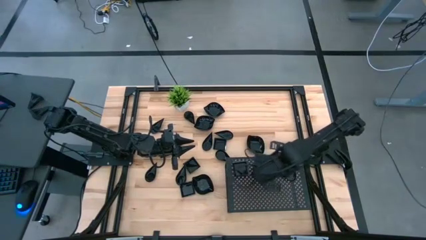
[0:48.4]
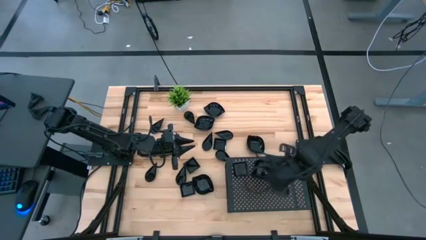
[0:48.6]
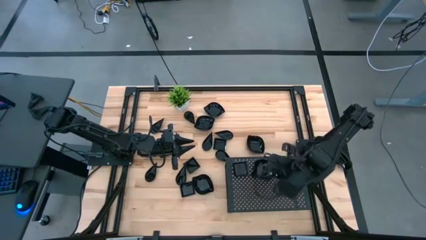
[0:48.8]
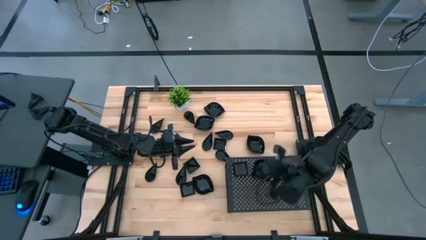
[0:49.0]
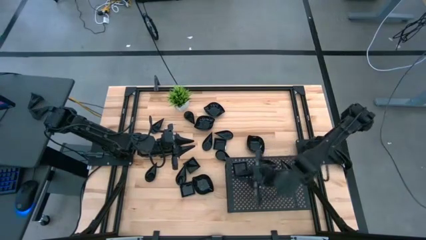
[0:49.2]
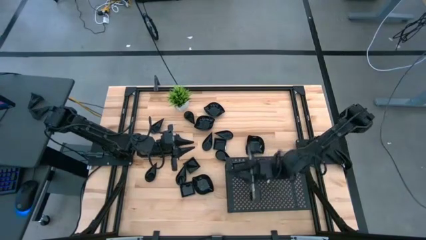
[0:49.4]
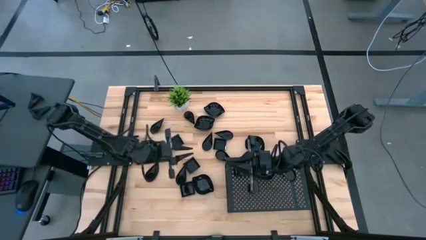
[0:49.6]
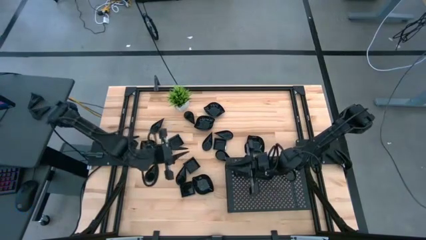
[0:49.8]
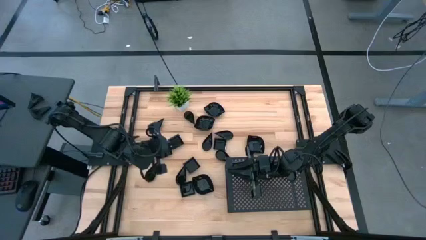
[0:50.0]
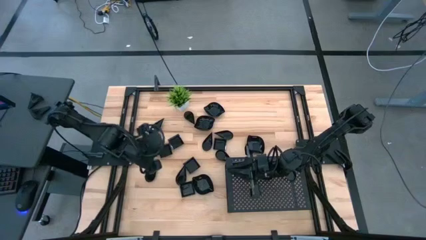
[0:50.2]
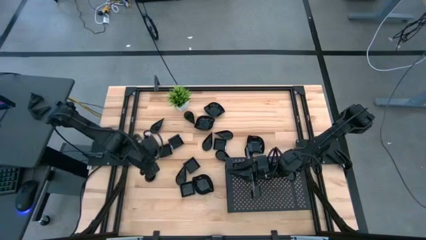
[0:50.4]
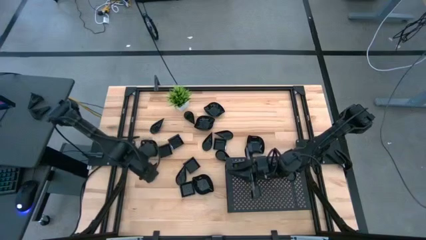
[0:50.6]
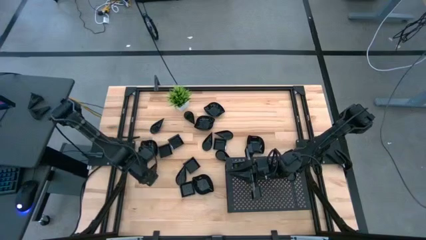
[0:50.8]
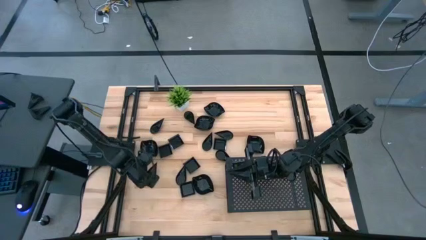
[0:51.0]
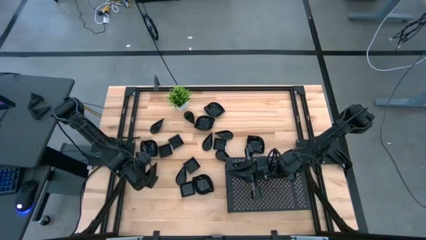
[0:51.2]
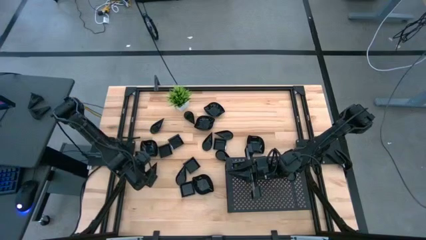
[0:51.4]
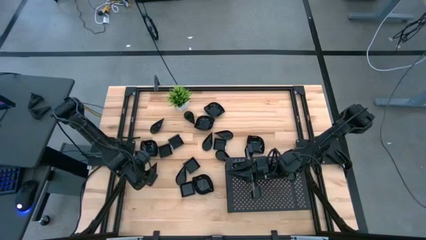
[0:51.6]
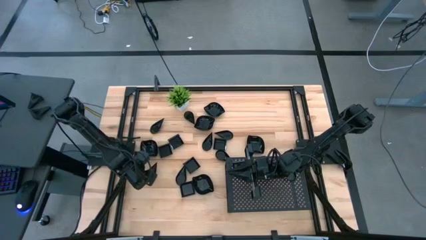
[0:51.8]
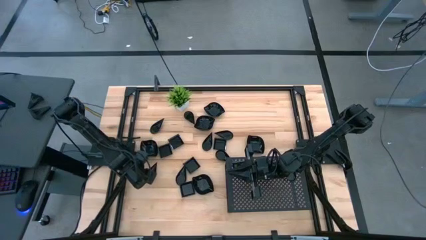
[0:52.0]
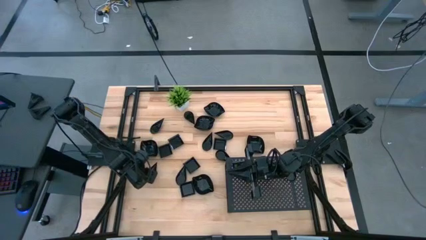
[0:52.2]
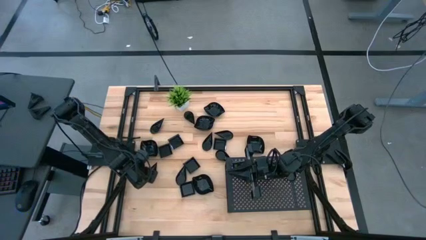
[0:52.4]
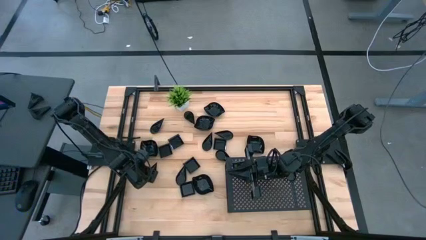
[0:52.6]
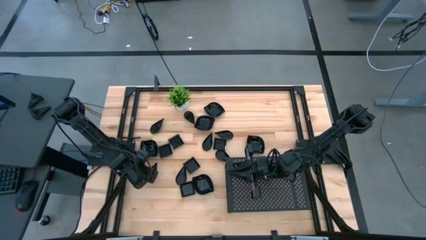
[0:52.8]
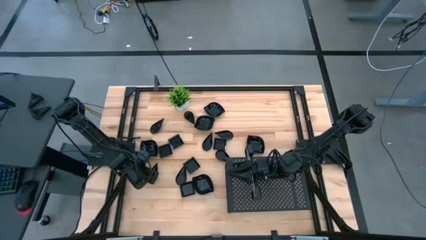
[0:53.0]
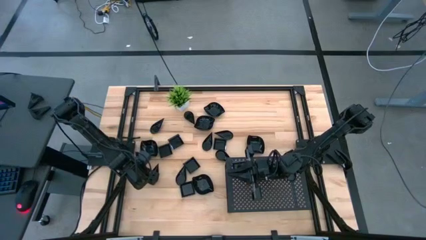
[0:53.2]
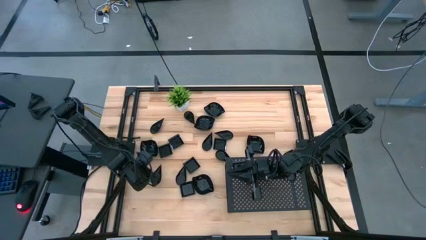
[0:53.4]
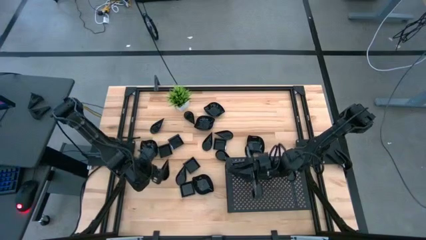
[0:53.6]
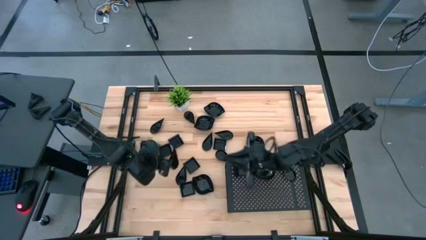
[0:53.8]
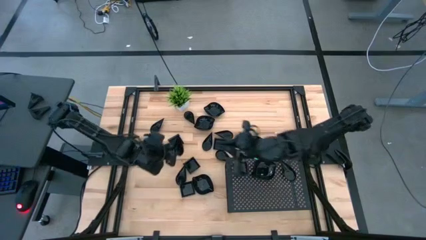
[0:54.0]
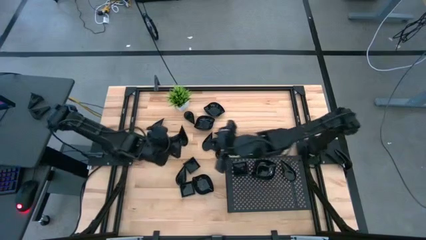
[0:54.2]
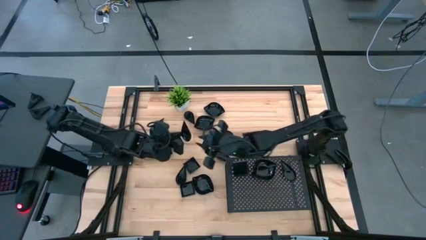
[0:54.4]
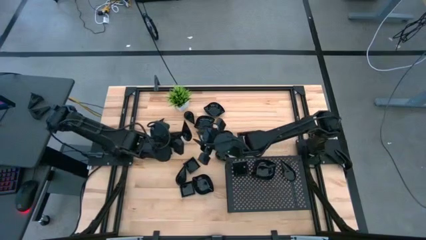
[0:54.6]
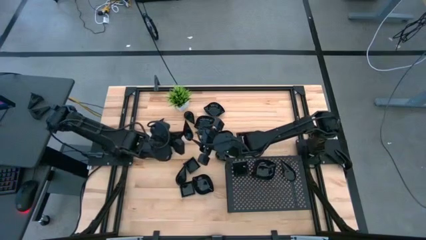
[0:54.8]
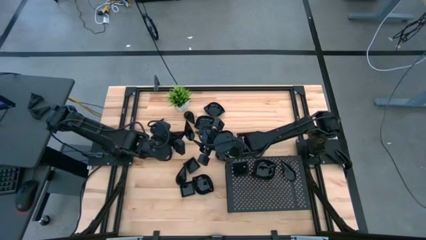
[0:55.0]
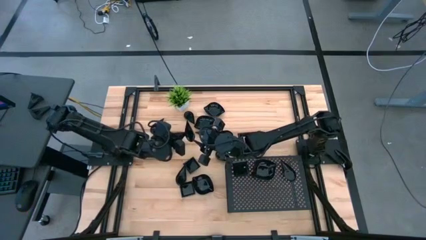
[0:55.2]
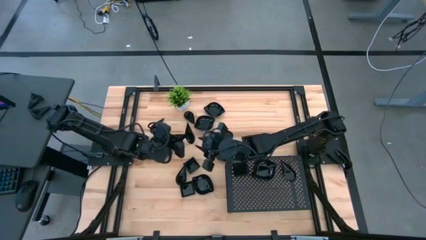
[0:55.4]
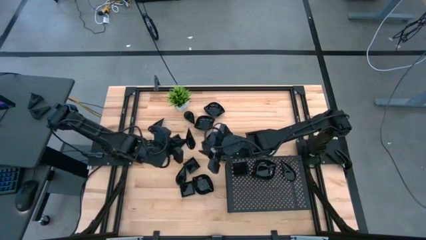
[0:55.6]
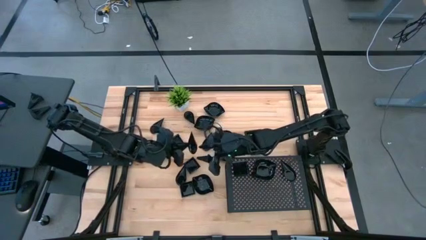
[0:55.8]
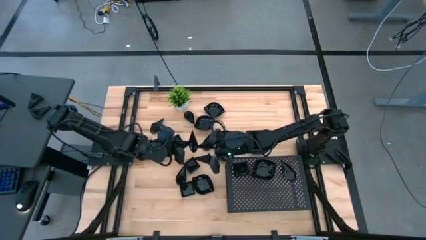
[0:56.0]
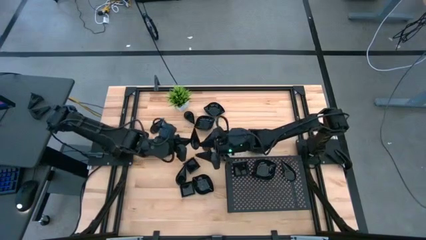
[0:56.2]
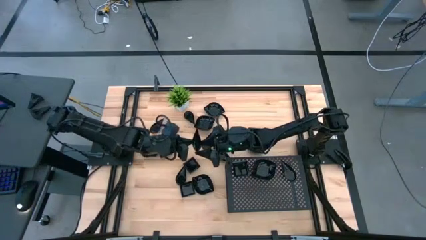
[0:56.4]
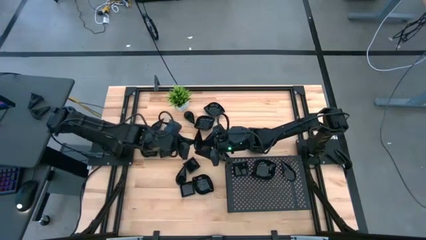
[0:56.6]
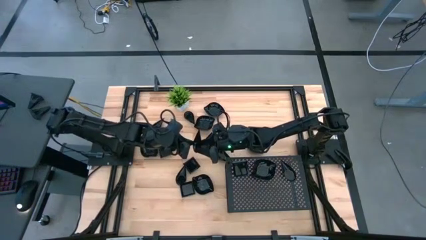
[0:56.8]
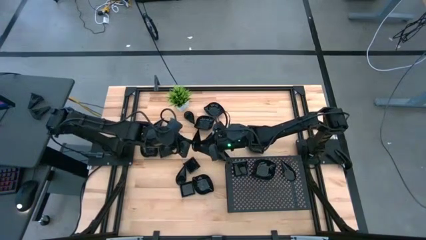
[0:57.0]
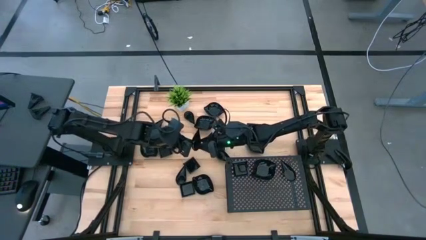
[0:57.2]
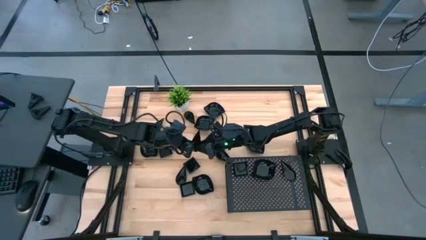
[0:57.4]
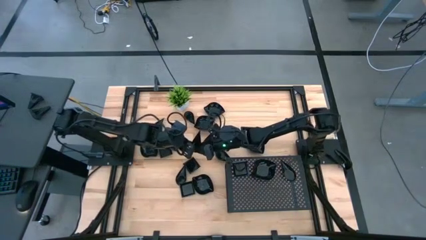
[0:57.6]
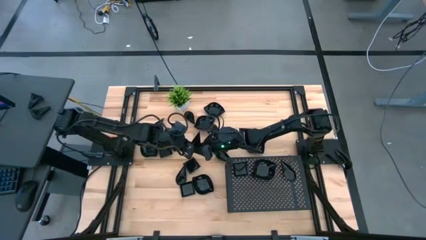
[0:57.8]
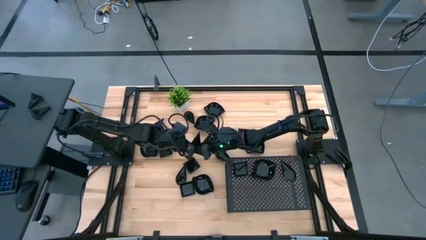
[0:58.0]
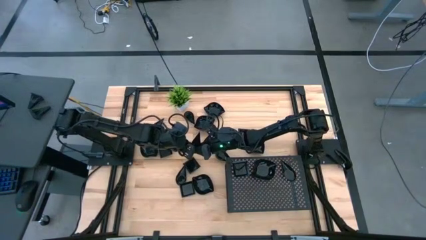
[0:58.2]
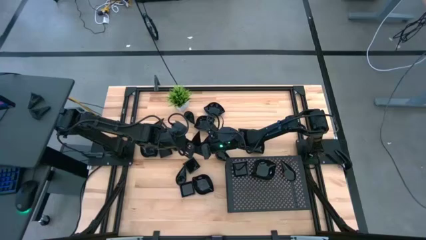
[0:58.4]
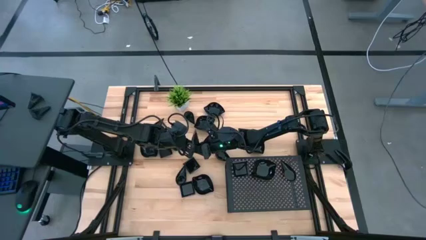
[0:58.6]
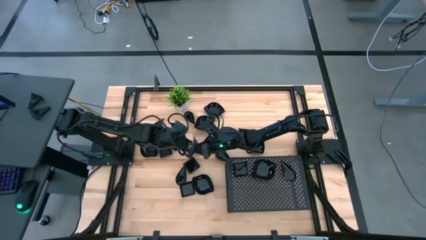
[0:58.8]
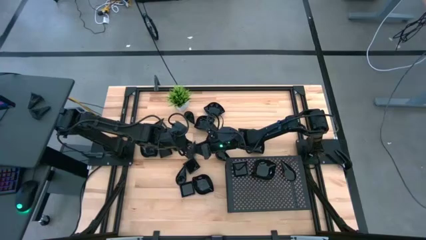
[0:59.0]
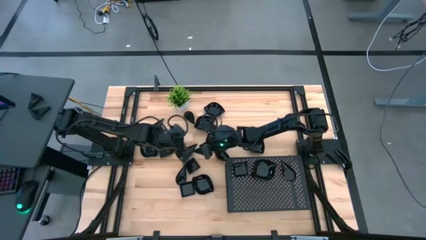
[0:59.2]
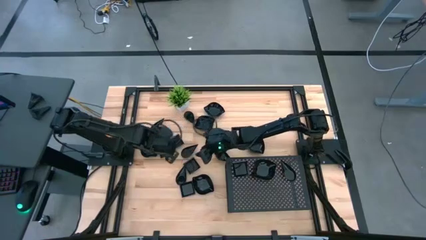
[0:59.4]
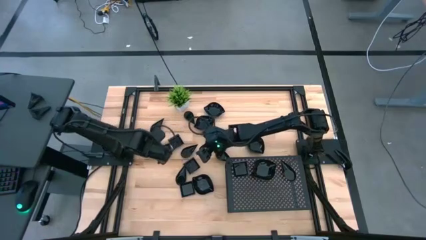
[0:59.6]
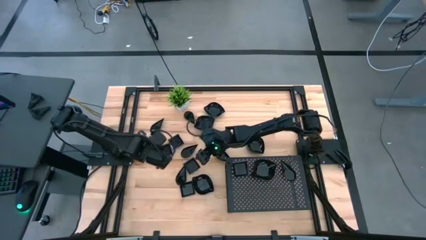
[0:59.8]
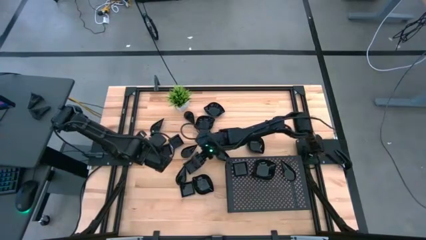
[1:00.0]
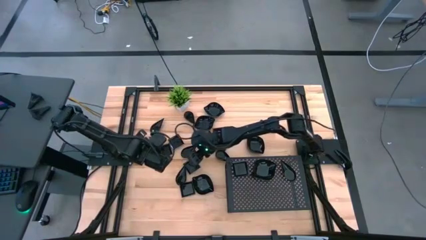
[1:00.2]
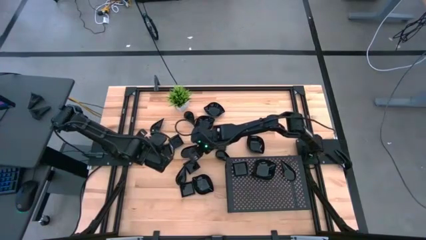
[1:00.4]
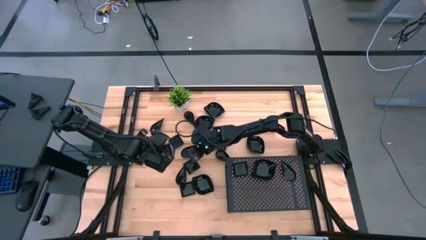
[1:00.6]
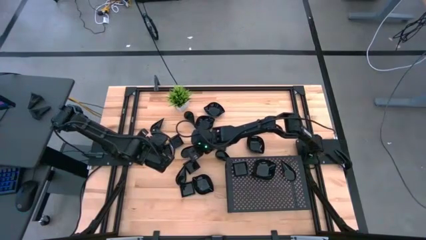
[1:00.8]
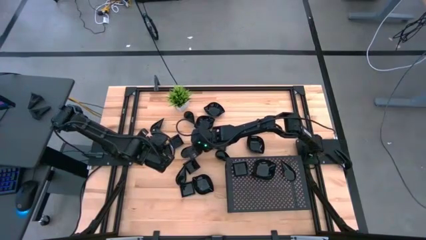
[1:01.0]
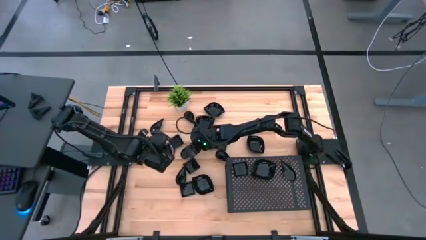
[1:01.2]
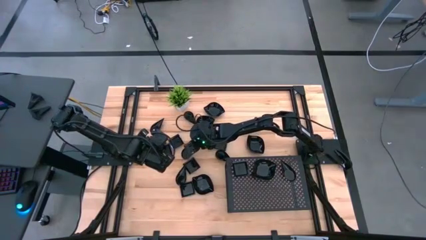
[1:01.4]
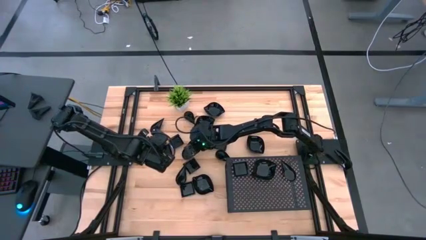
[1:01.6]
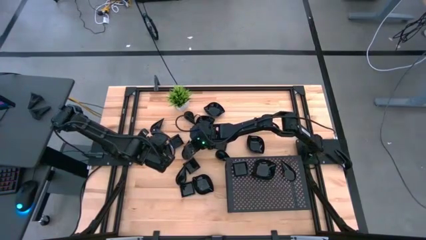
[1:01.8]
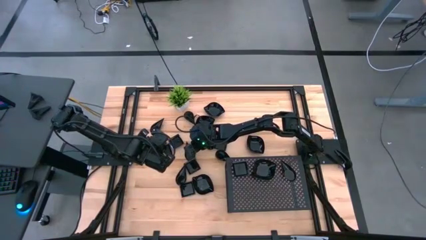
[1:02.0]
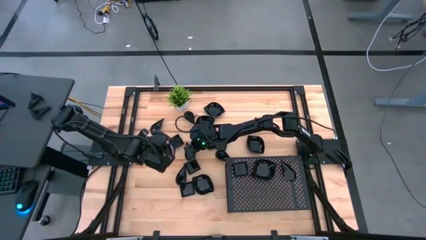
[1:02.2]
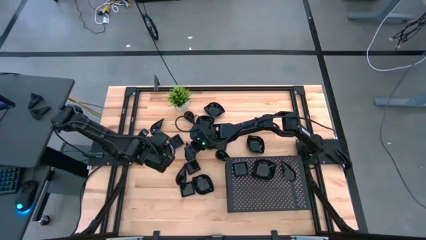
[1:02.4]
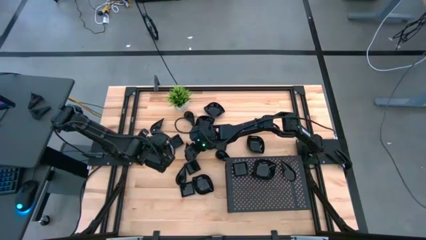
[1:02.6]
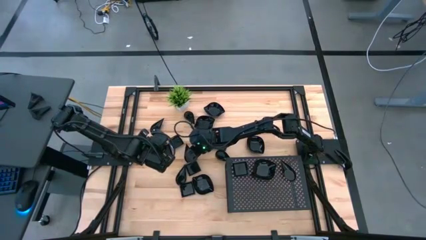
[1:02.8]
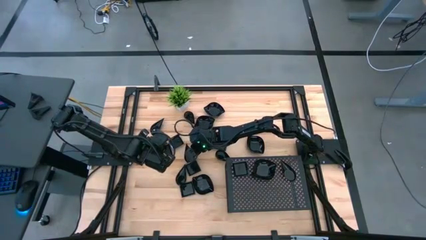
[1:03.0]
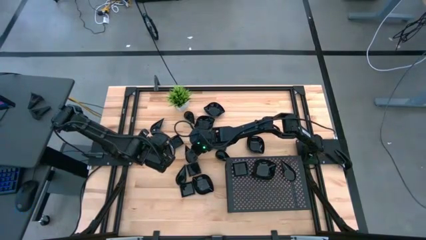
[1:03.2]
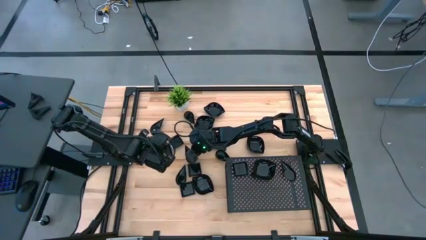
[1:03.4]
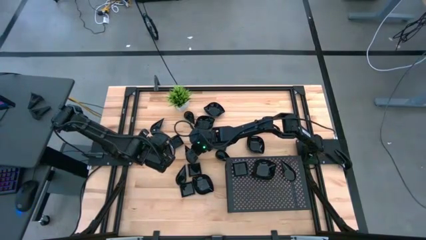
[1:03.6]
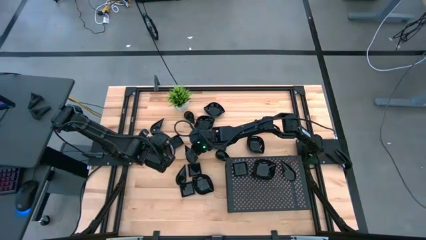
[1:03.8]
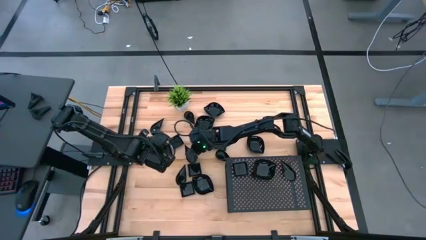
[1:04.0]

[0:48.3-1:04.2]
Task: Pick & Place Mini shaped plates
Stack the drop shaped plate on top of the drop shaped plate on the shelf
